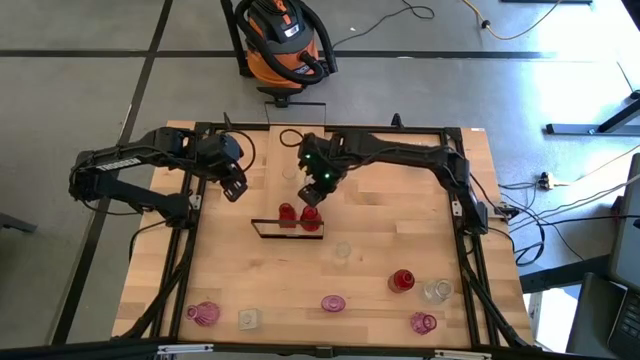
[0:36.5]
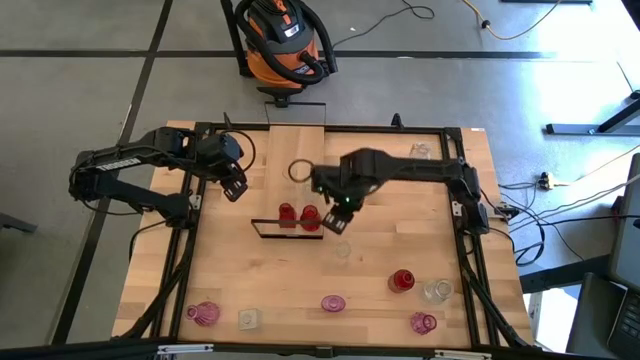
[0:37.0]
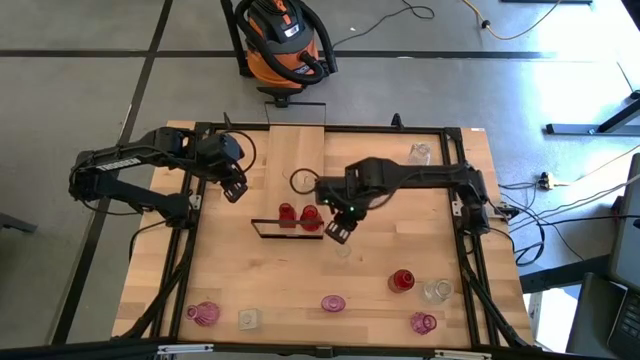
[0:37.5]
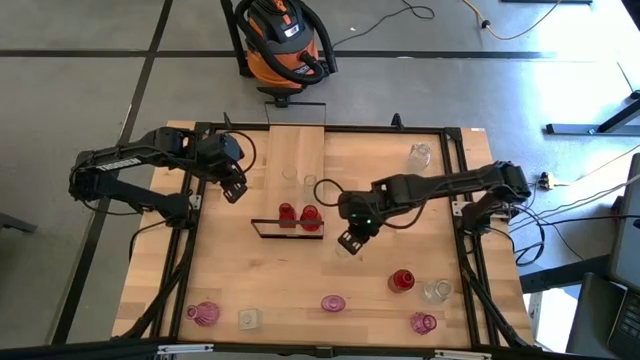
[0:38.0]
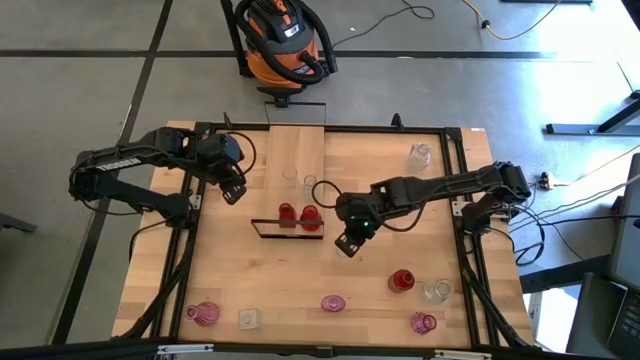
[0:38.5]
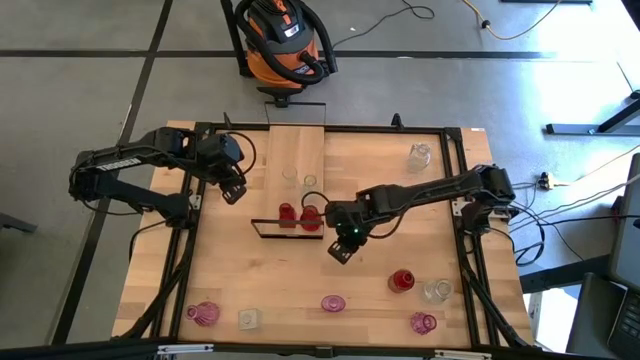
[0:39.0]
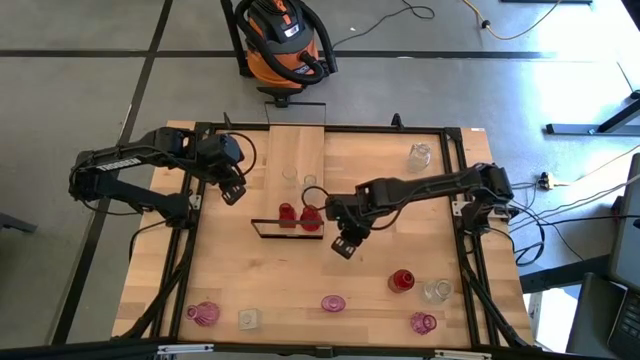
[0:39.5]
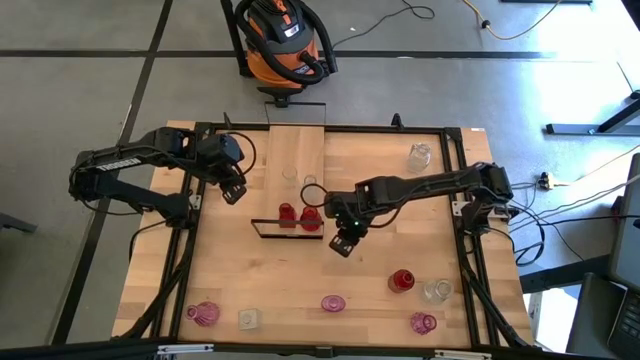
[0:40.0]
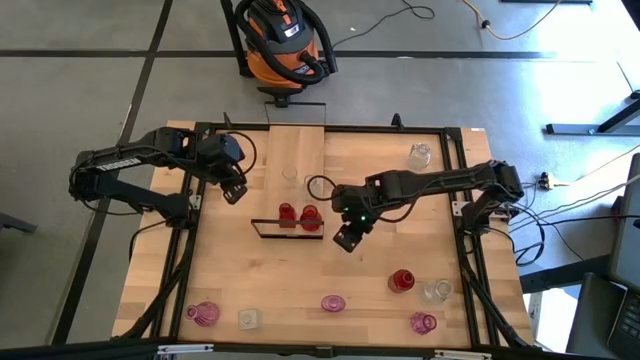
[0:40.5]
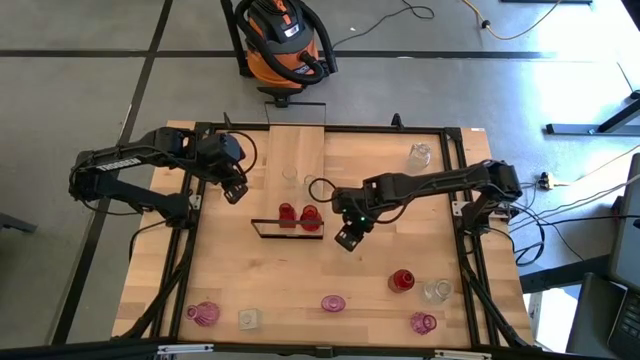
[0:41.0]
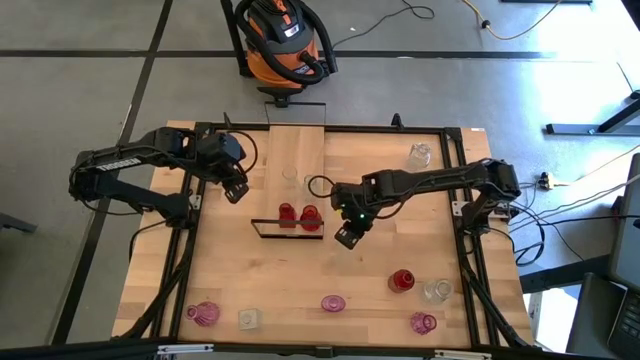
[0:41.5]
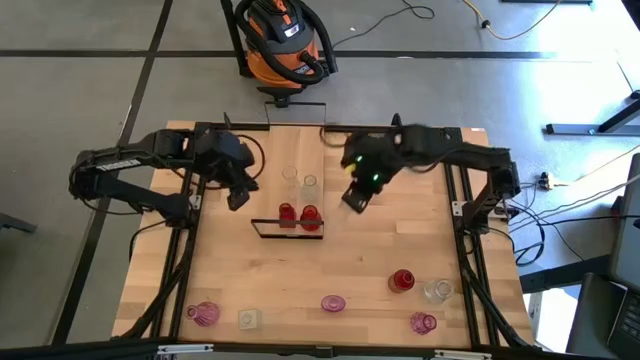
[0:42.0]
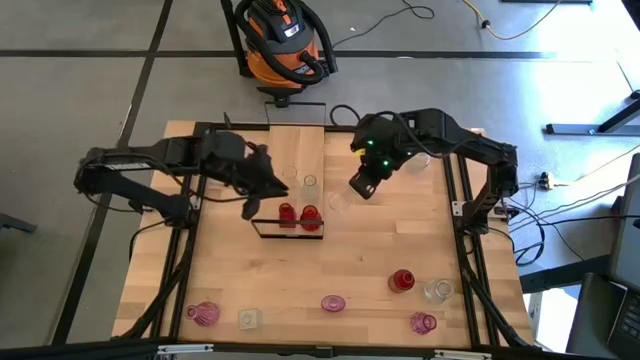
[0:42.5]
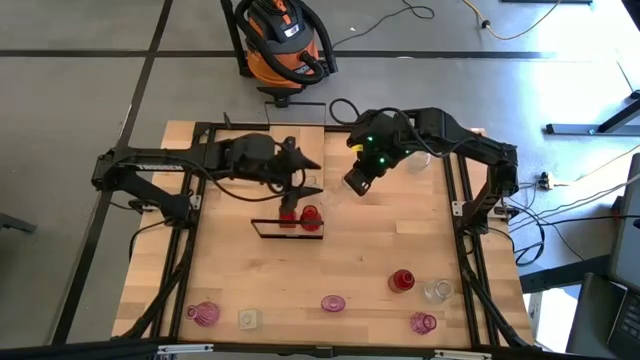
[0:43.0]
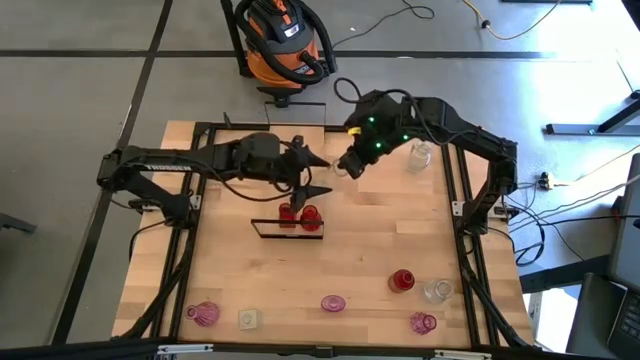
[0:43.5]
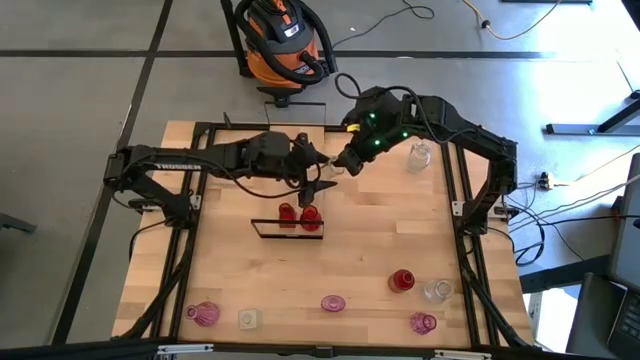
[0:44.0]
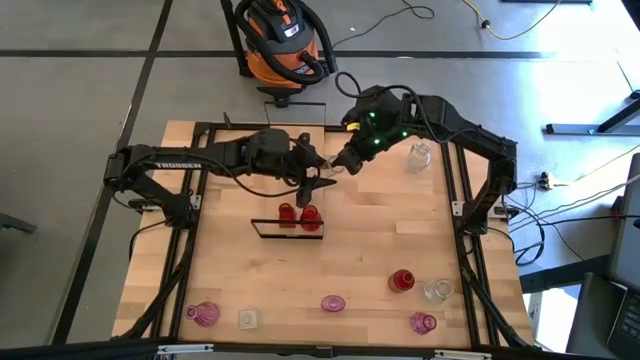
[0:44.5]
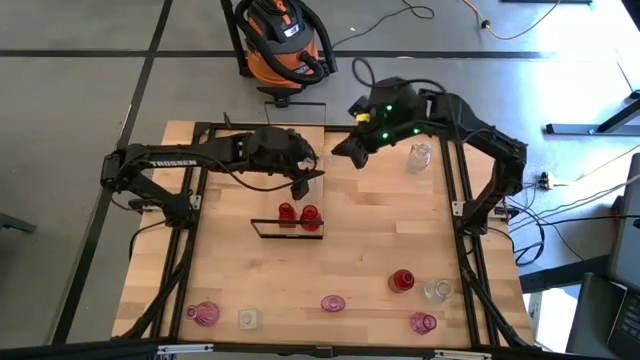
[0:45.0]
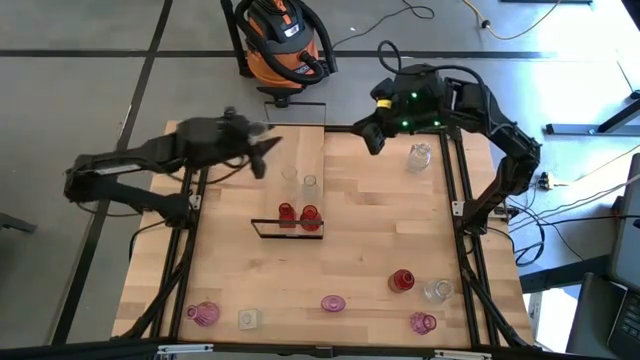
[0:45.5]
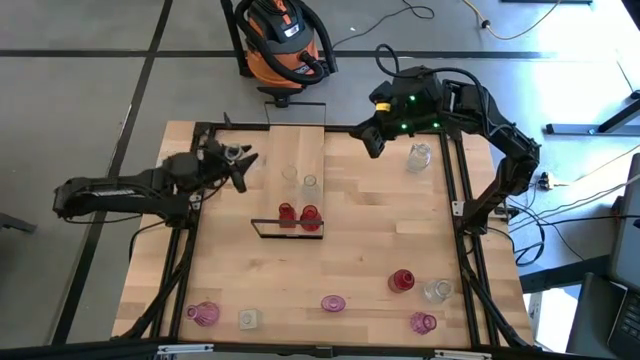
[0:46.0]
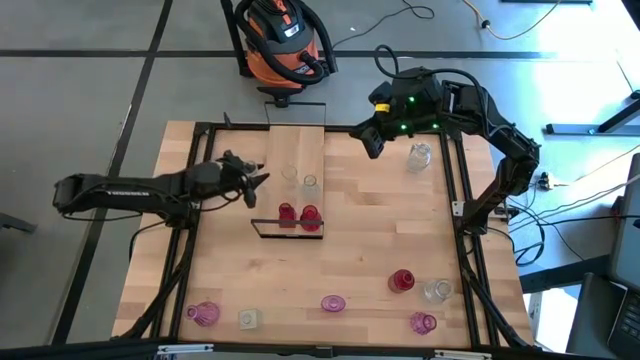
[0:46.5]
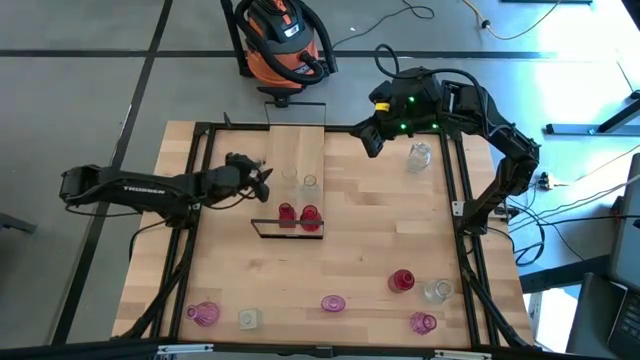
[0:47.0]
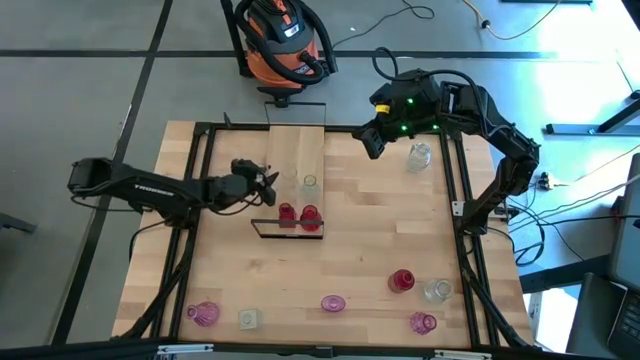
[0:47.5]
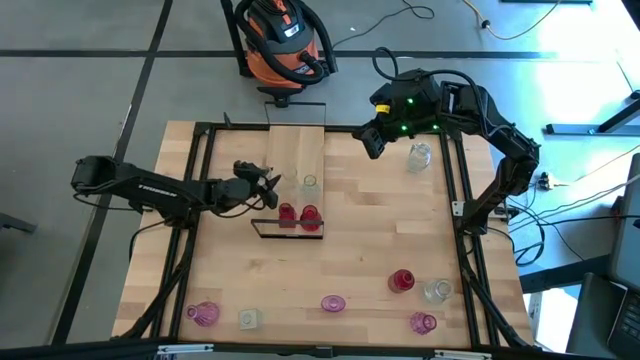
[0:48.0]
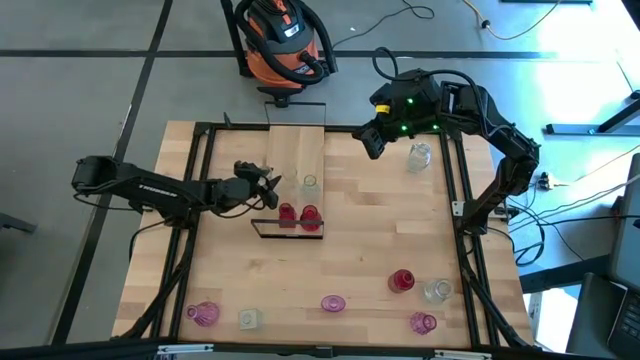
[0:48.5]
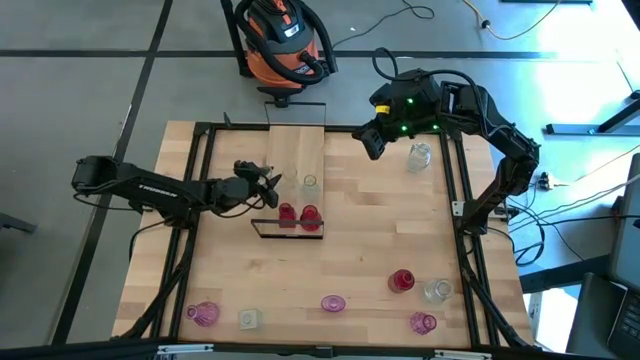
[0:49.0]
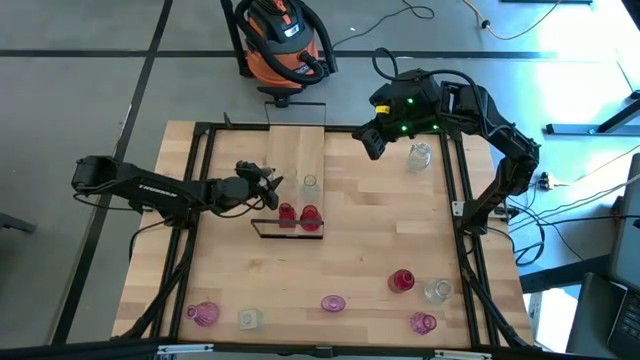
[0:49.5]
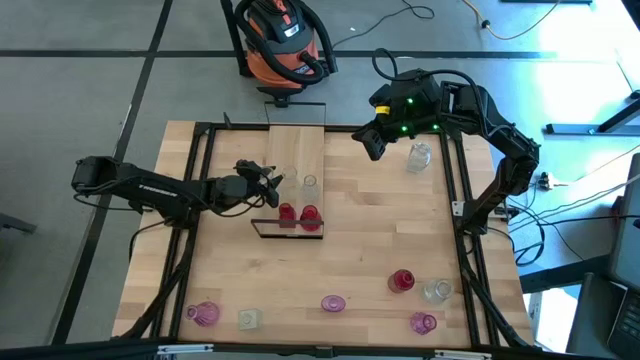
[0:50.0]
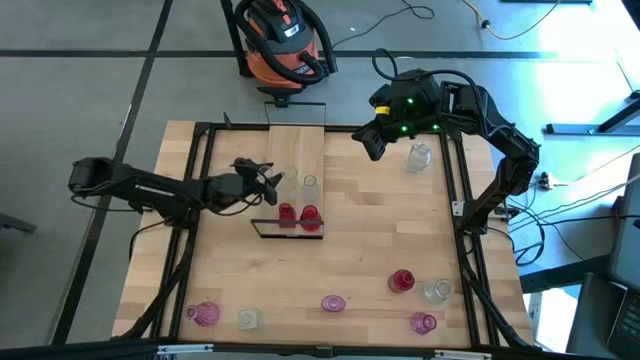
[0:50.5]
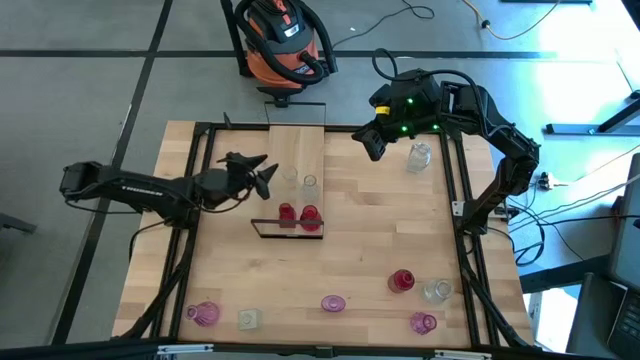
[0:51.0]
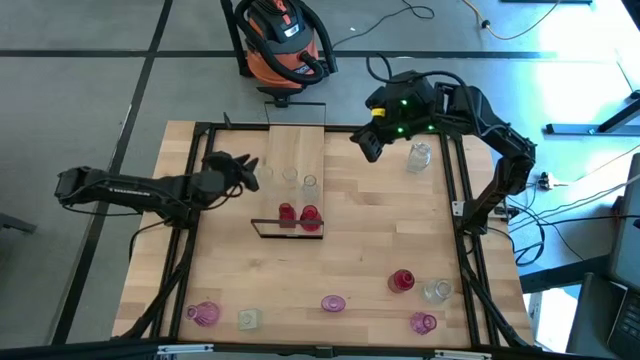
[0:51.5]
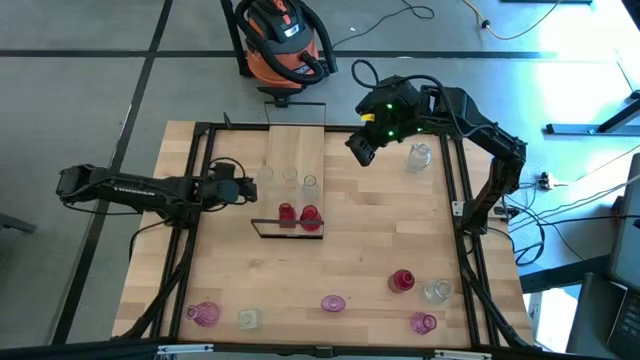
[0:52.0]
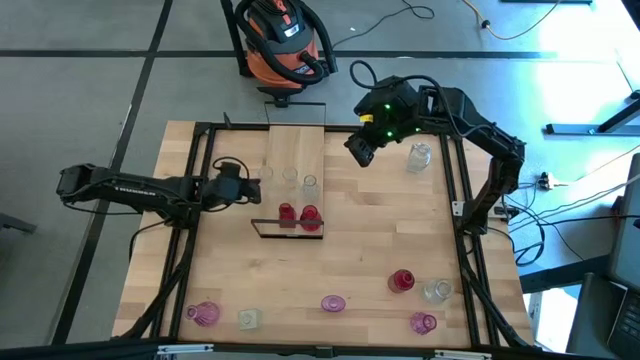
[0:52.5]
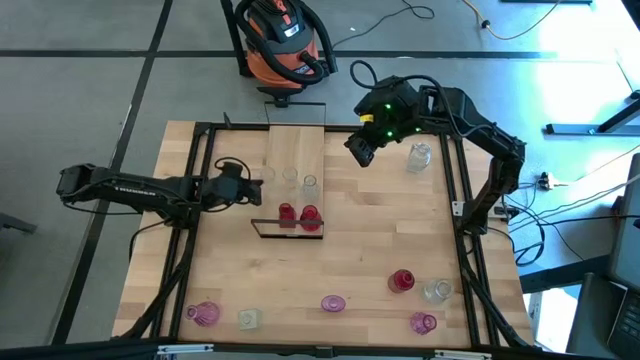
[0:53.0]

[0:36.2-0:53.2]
Task: sort vases onto shelf
Put the transparent vase on the shelf
